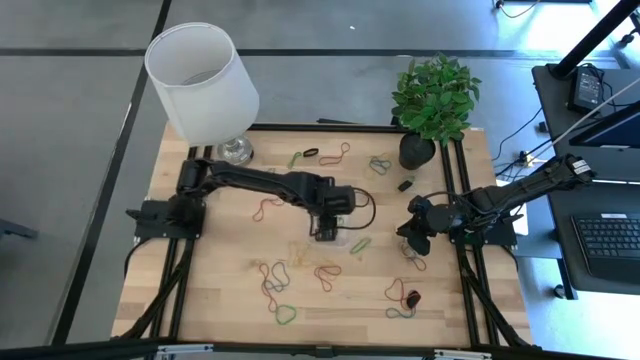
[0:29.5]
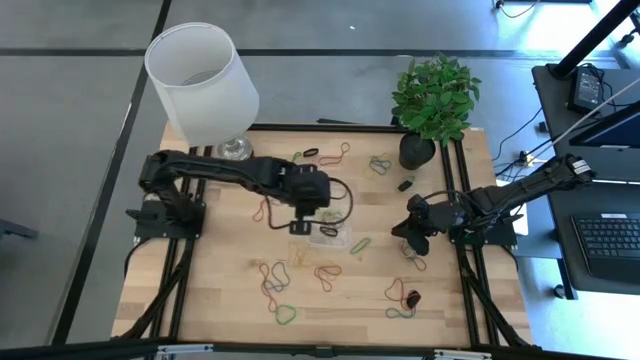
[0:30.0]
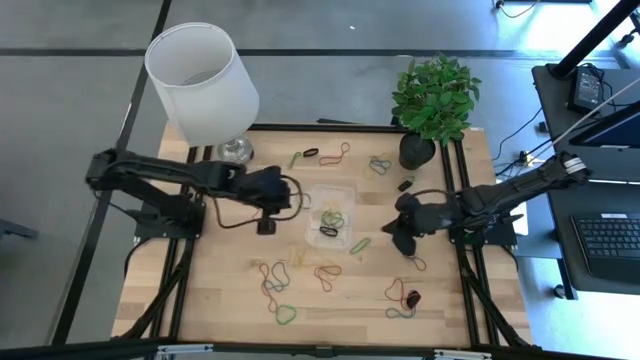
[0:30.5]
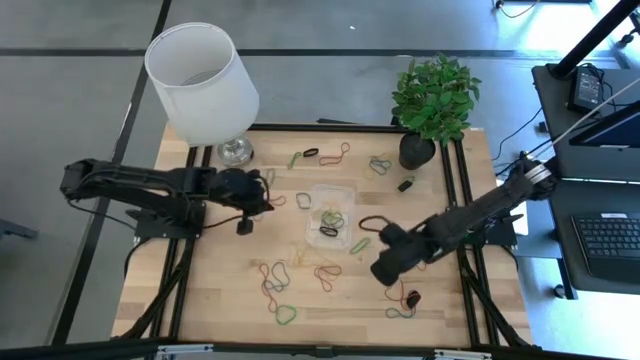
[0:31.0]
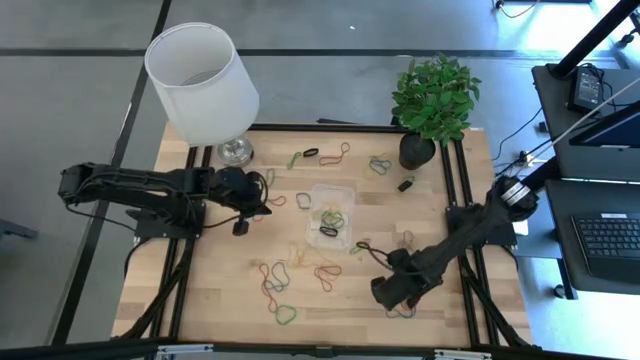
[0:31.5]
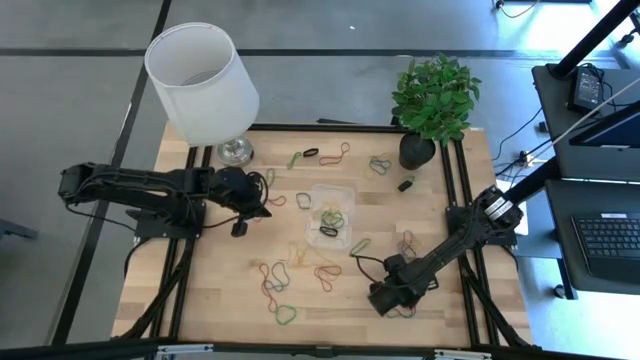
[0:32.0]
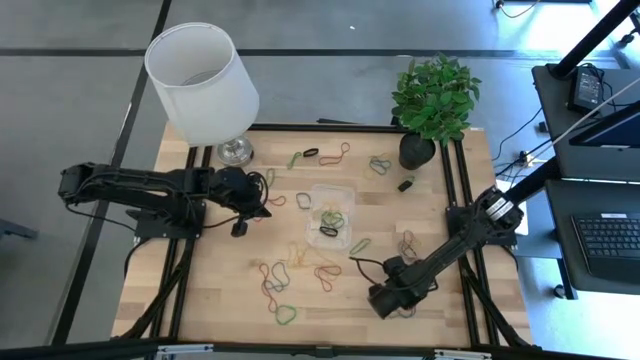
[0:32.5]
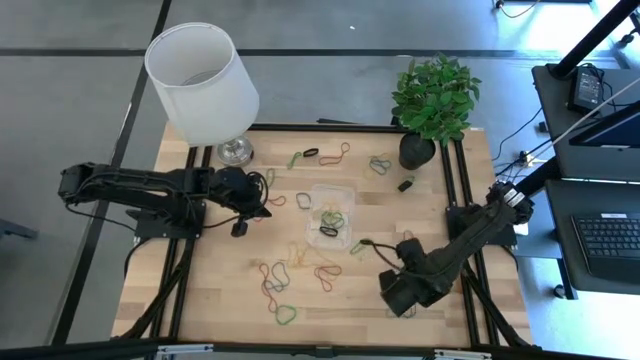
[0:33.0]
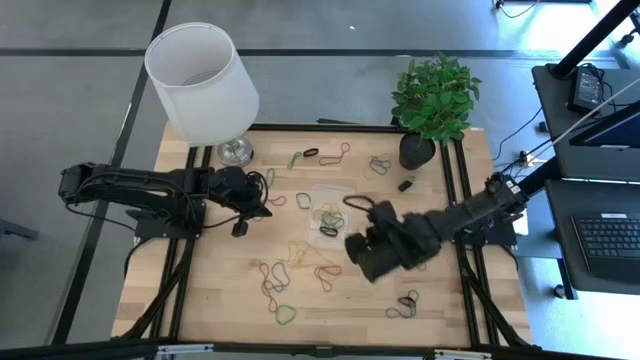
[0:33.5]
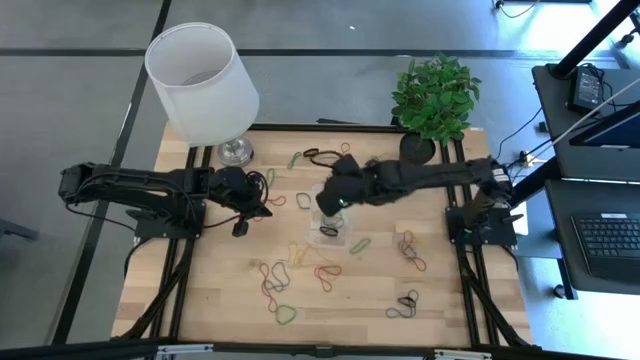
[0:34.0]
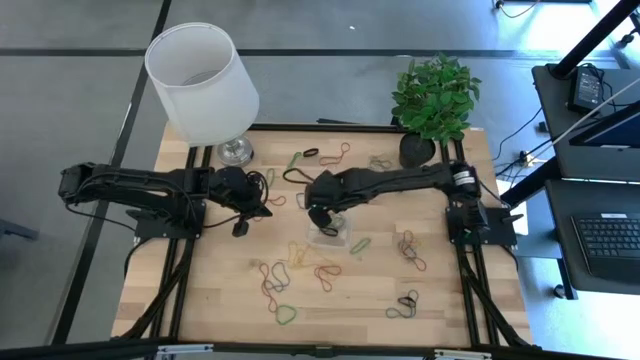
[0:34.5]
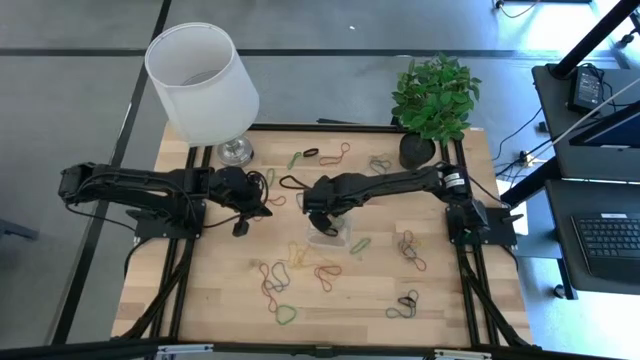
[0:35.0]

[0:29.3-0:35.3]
Task: Pick and place rubber bands into bin
Put the red rubber band into the bin

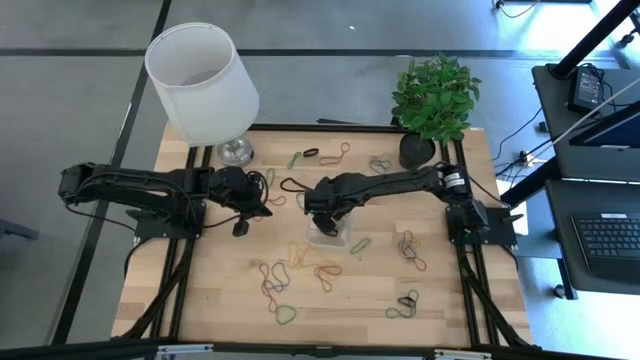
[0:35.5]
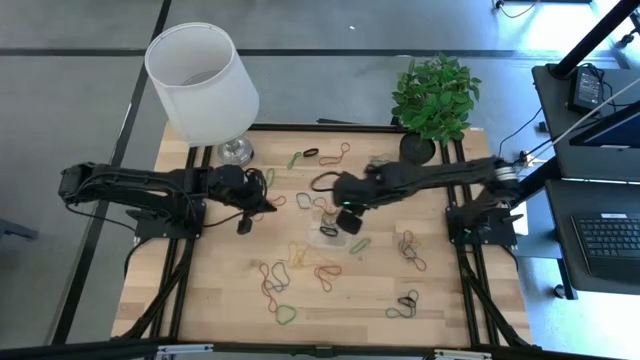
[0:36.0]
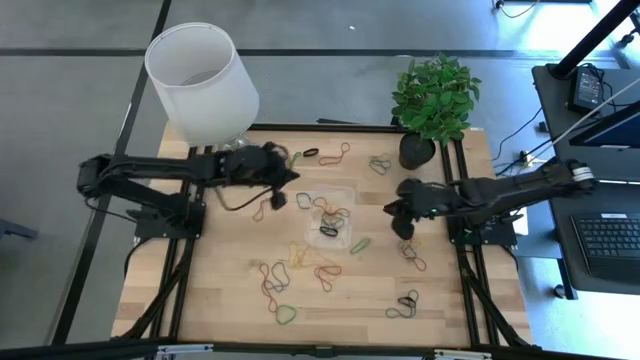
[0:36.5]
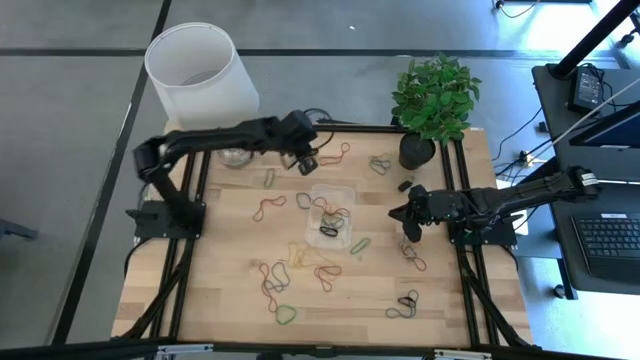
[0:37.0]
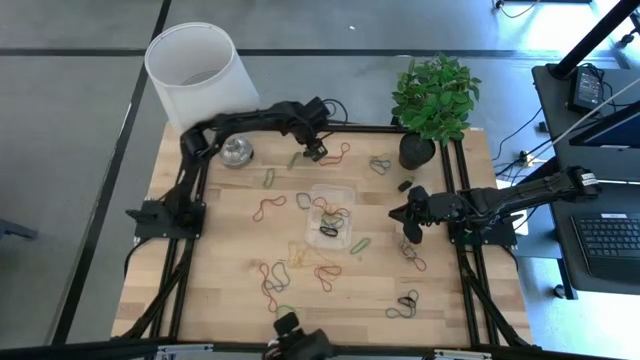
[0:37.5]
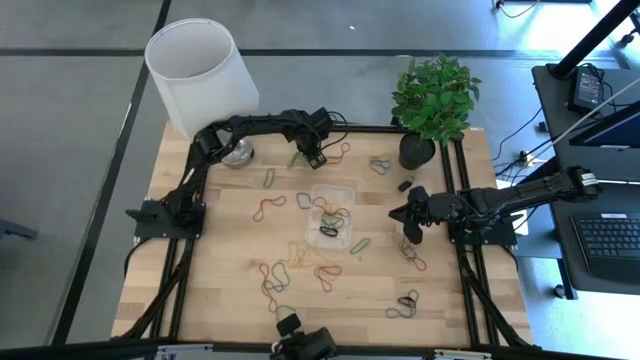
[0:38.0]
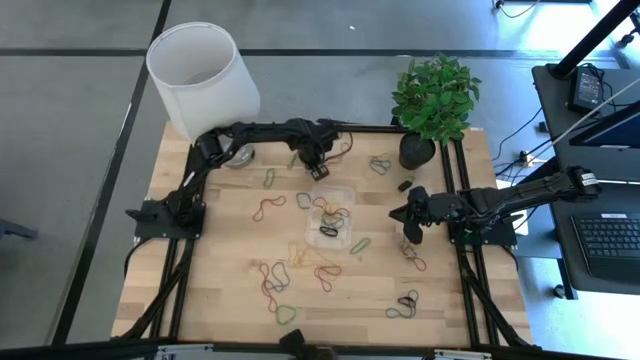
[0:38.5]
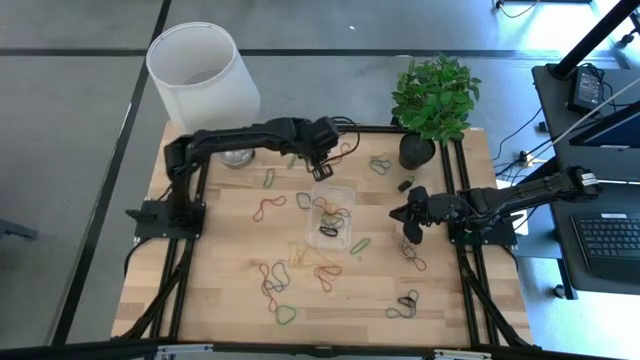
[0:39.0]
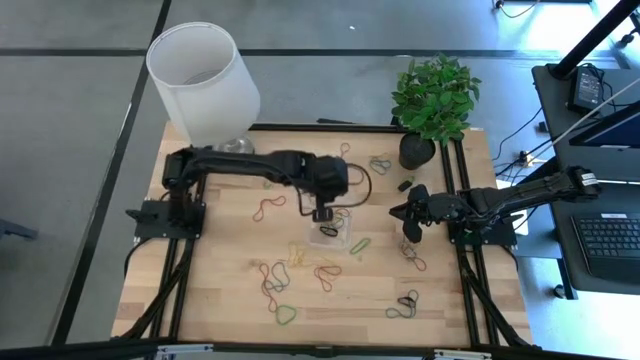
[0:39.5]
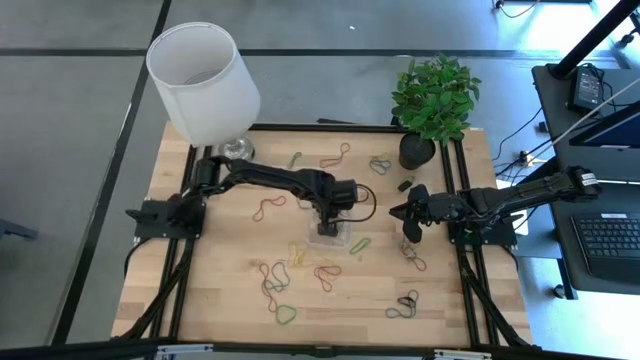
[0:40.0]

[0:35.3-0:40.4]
Put the top left black rubber band into the bin

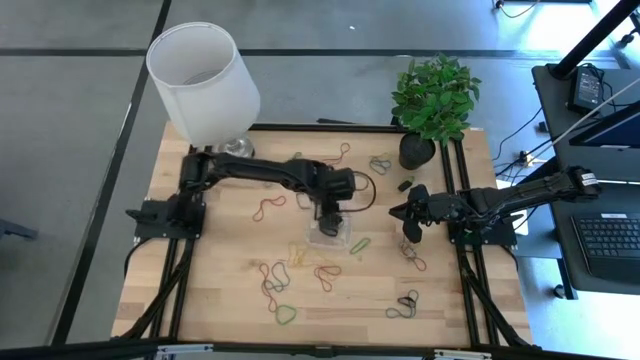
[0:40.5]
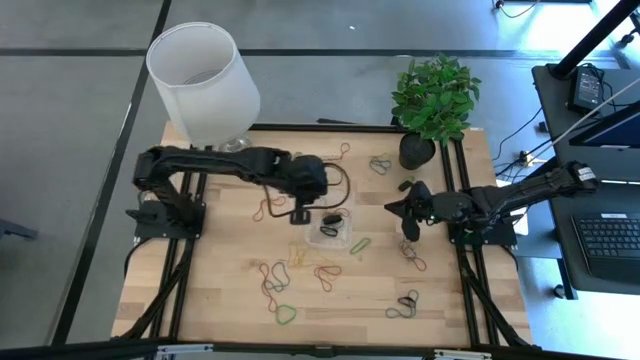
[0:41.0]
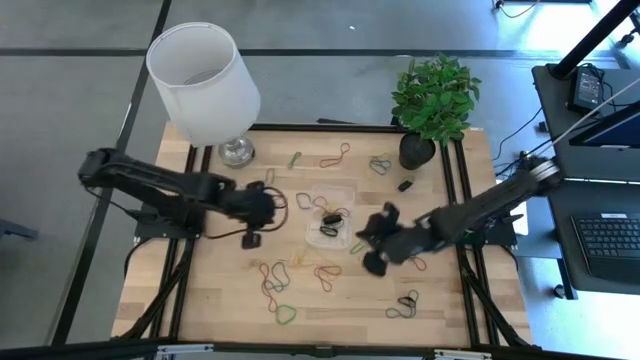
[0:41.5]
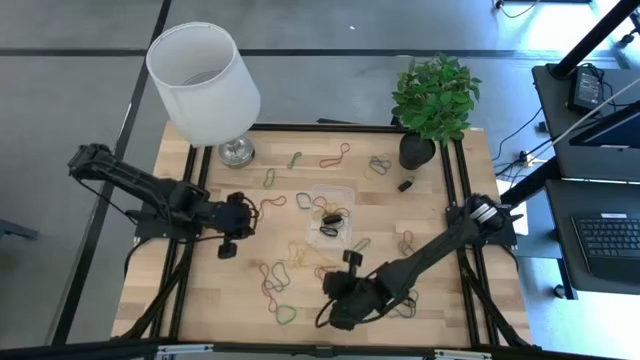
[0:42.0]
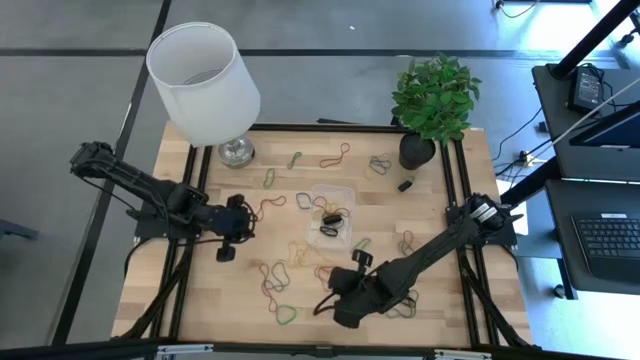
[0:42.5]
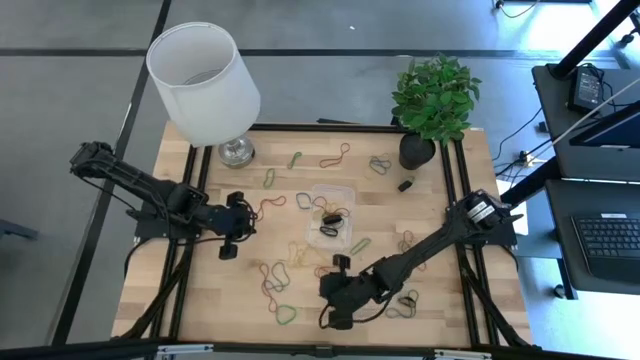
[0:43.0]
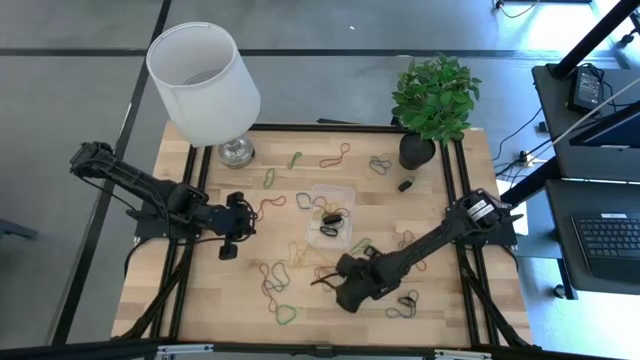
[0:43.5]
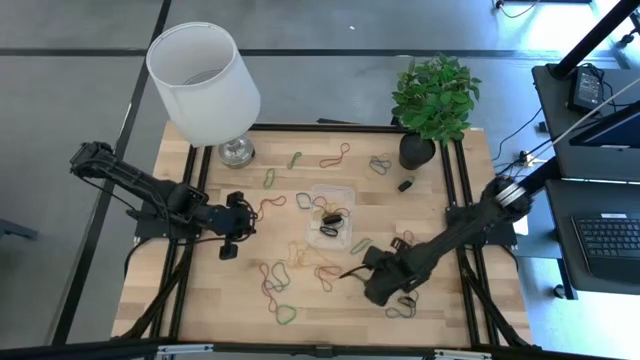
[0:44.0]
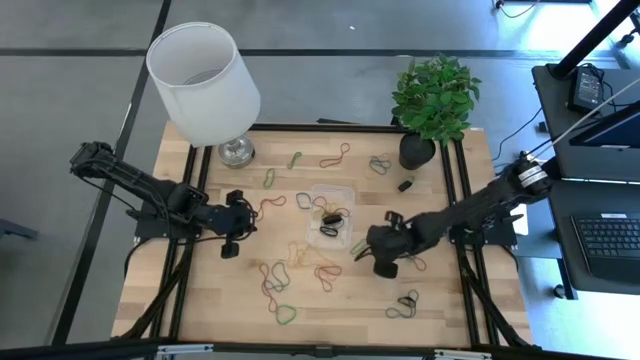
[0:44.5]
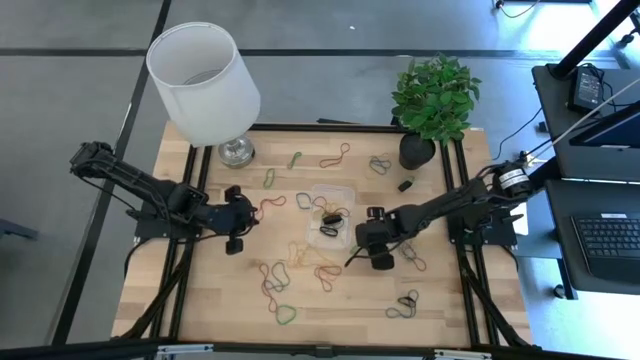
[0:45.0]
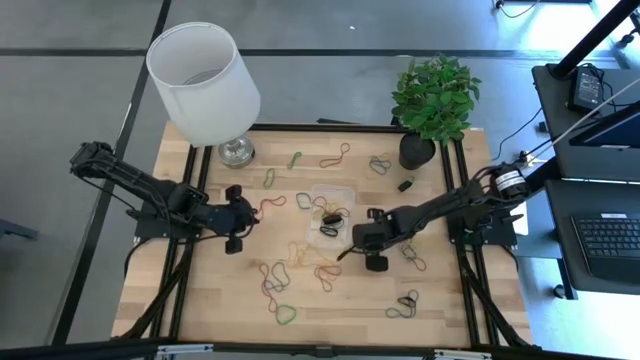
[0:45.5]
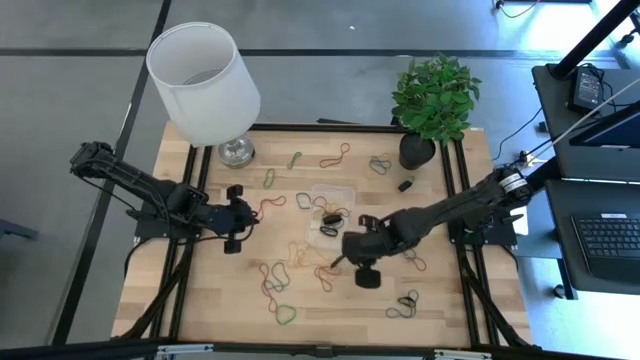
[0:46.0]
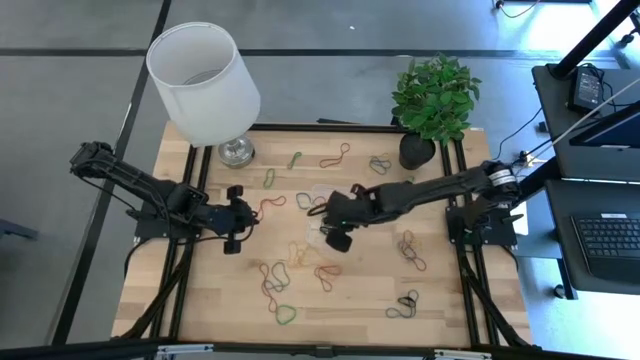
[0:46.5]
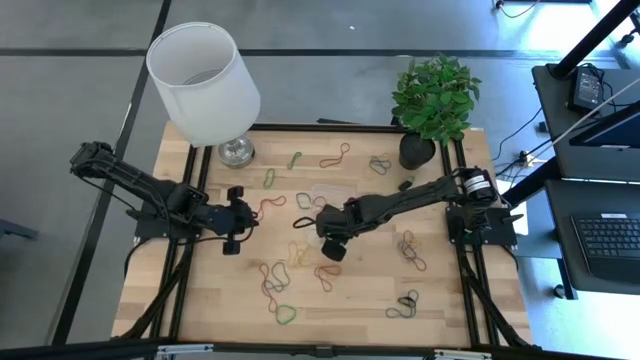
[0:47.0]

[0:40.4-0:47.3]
Put the green rubber band into the bin

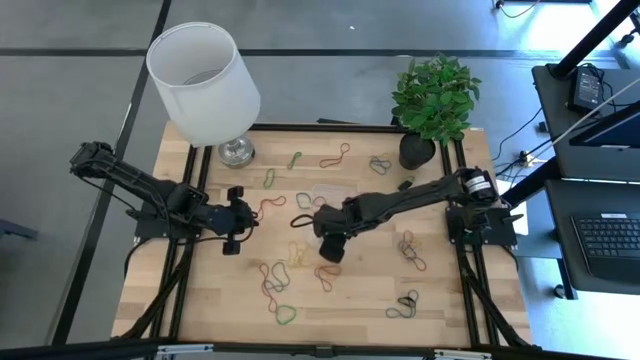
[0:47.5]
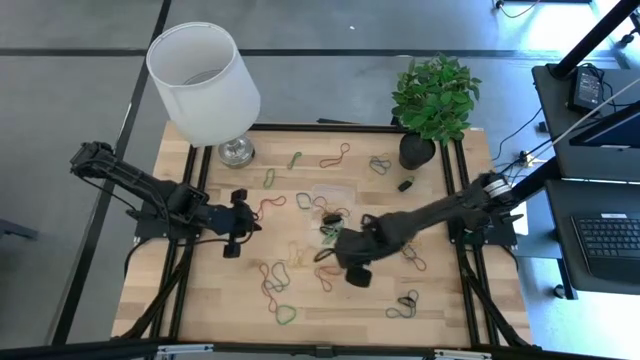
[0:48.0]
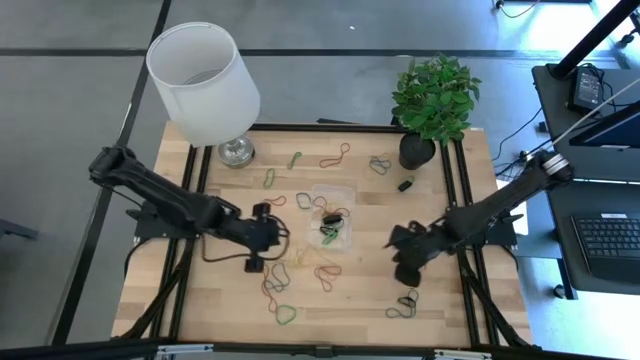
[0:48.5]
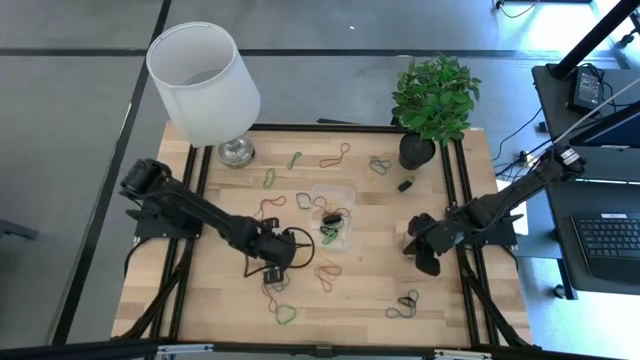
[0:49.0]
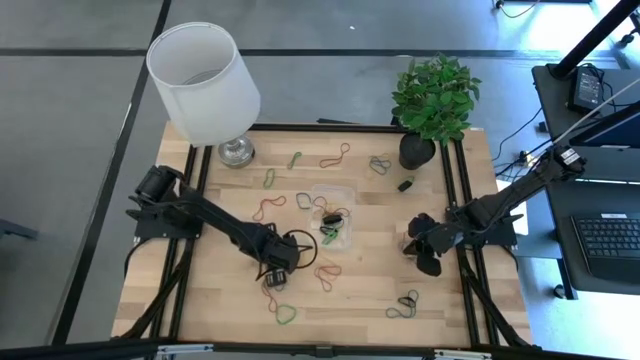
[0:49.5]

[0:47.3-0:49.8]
Put the blue rubber band into the bin
